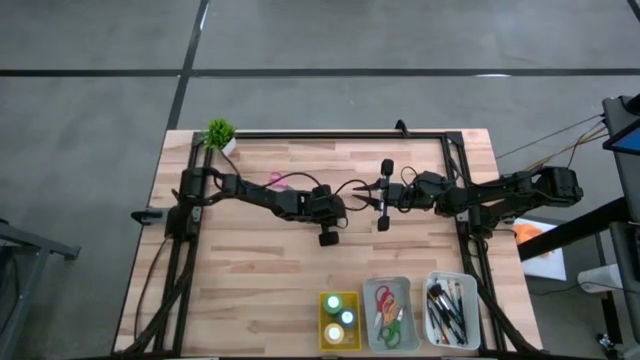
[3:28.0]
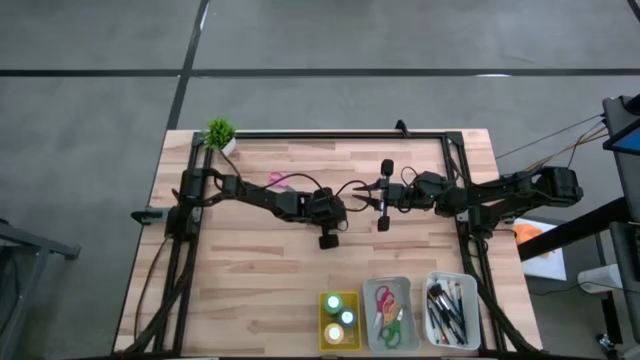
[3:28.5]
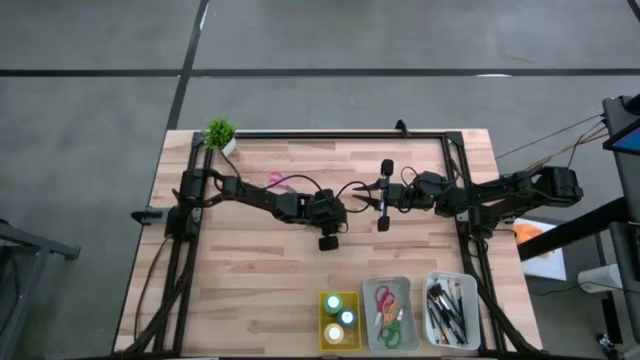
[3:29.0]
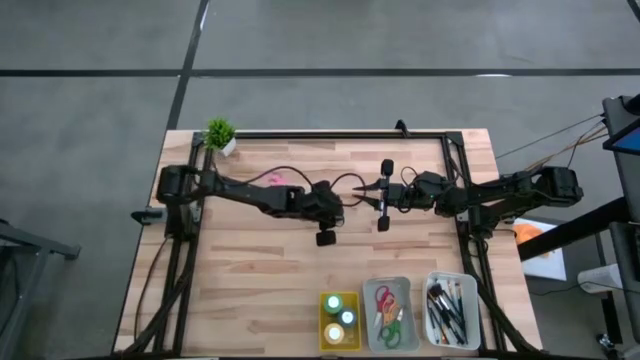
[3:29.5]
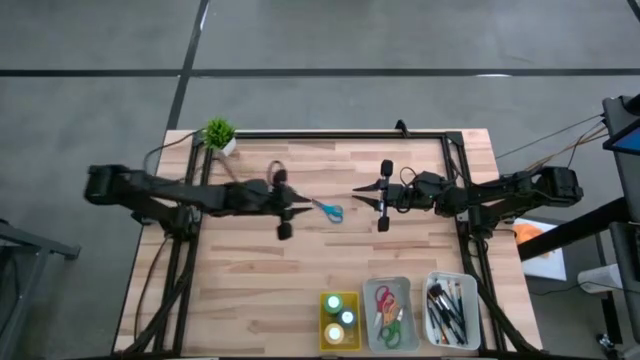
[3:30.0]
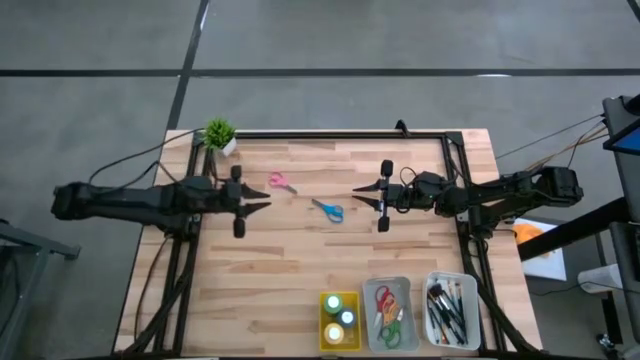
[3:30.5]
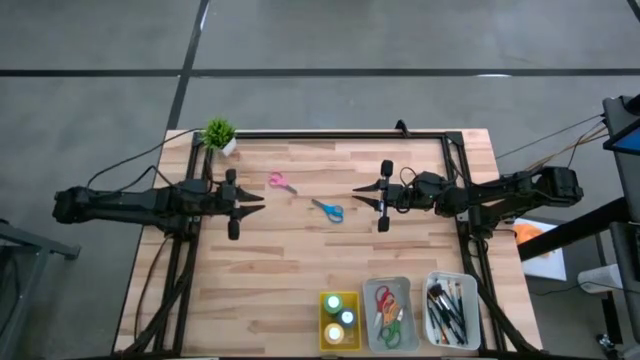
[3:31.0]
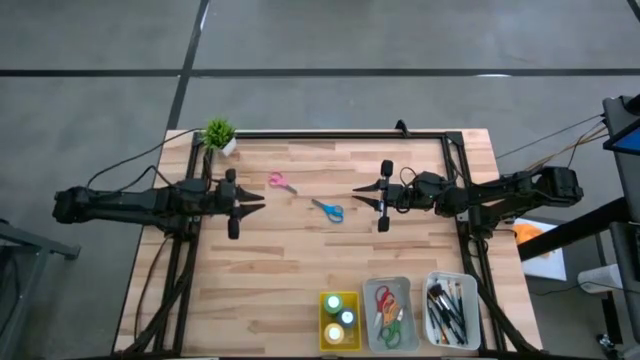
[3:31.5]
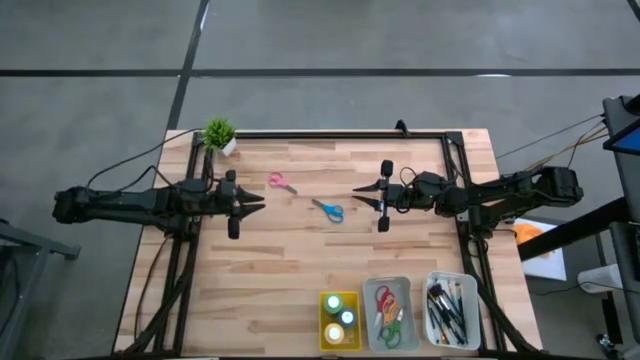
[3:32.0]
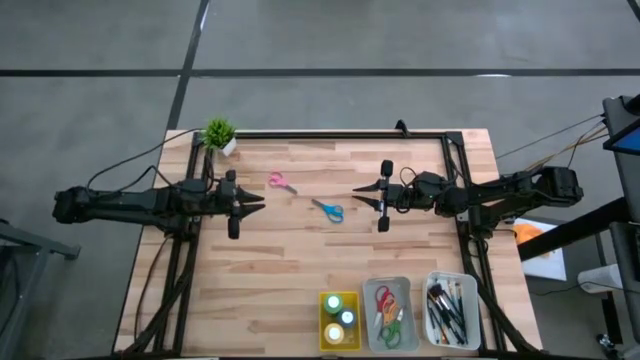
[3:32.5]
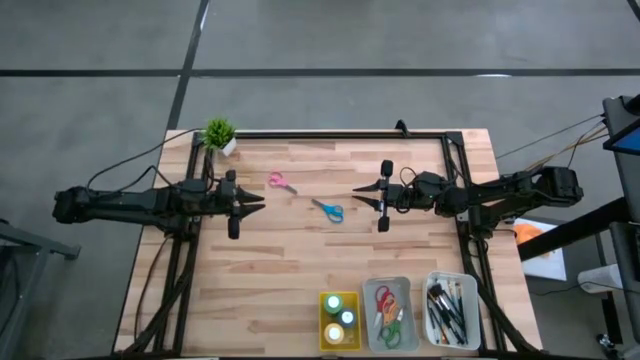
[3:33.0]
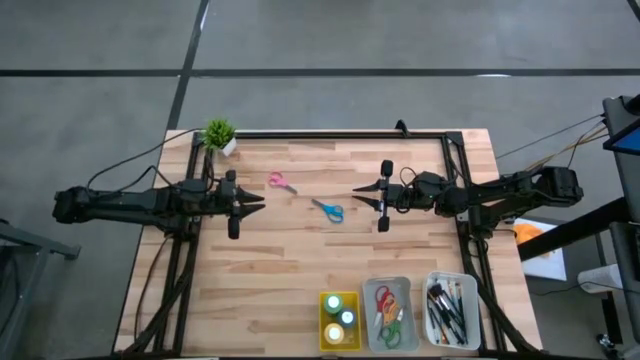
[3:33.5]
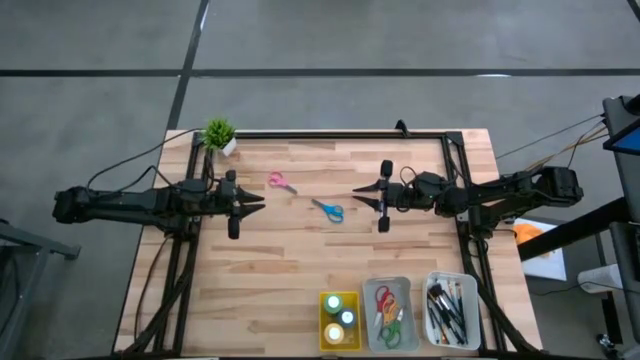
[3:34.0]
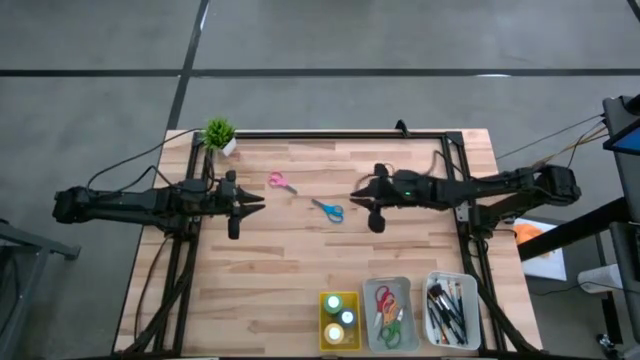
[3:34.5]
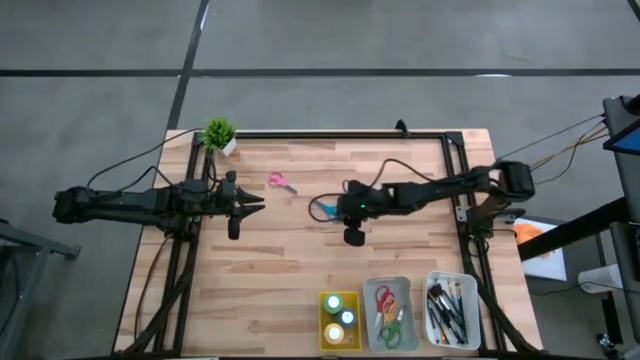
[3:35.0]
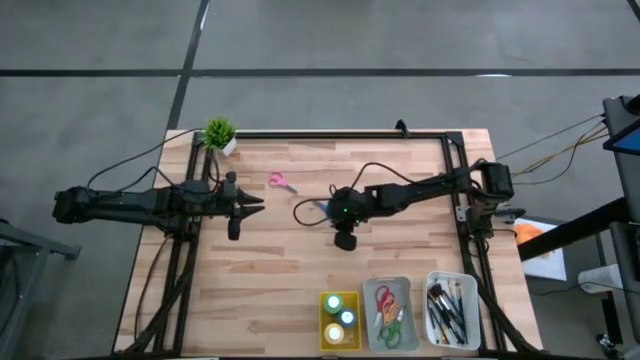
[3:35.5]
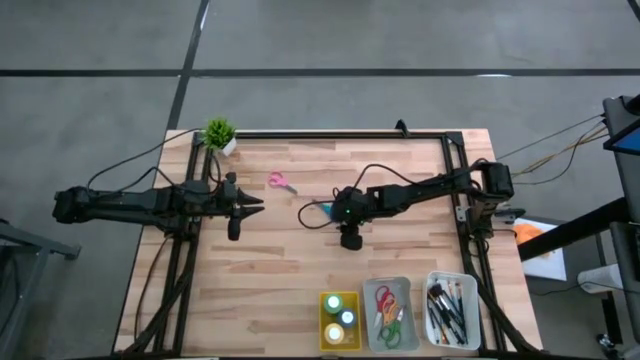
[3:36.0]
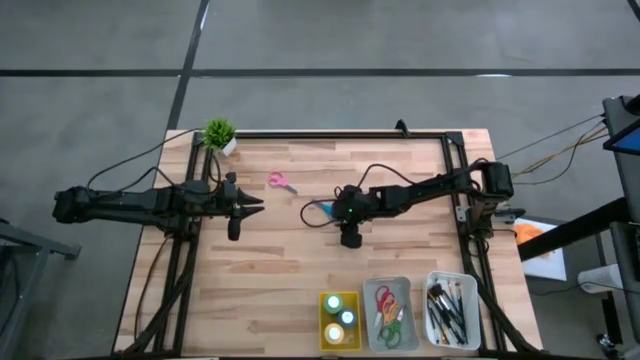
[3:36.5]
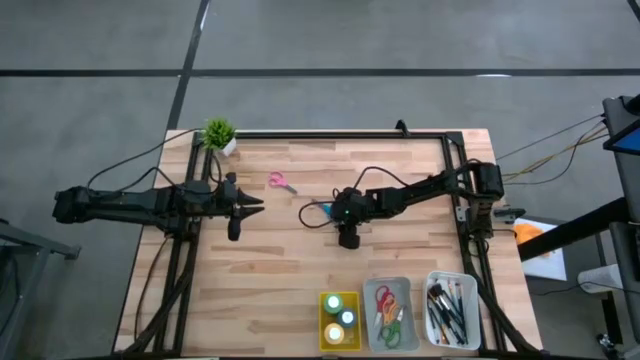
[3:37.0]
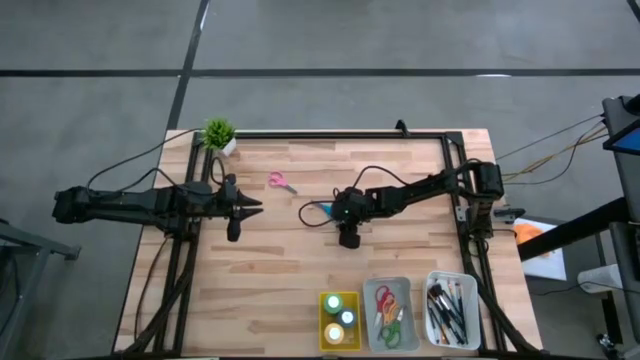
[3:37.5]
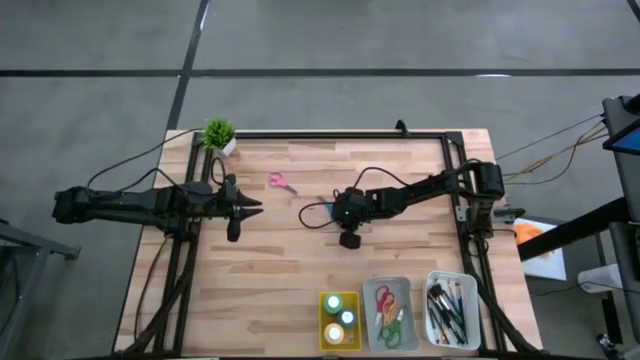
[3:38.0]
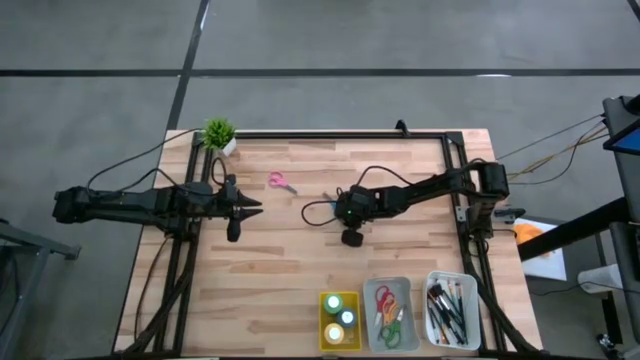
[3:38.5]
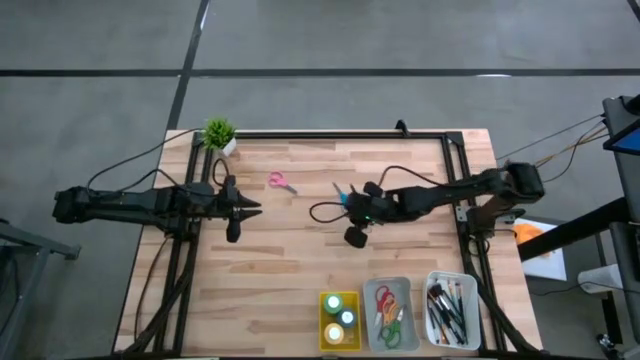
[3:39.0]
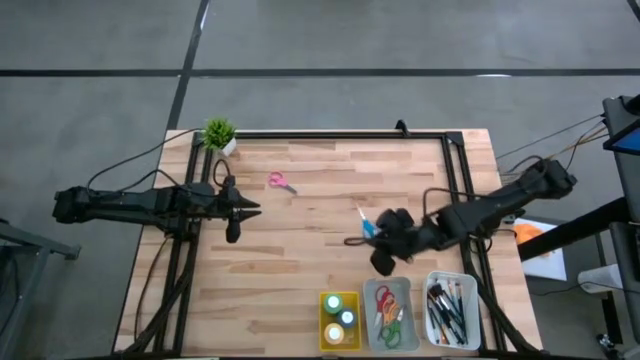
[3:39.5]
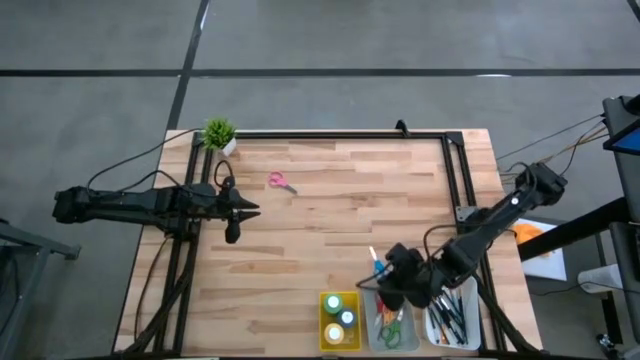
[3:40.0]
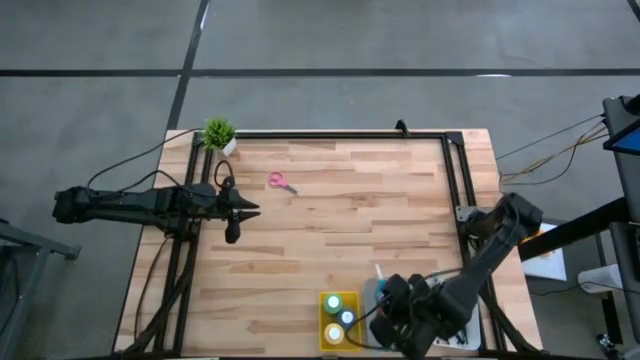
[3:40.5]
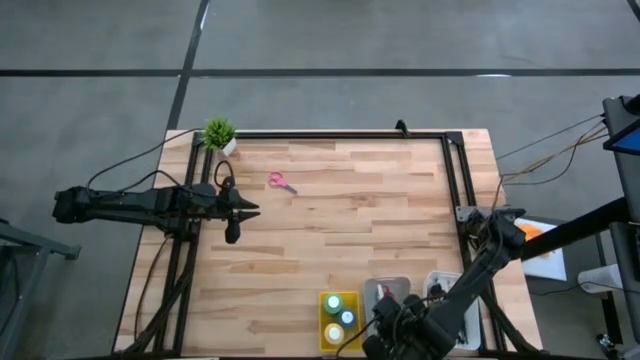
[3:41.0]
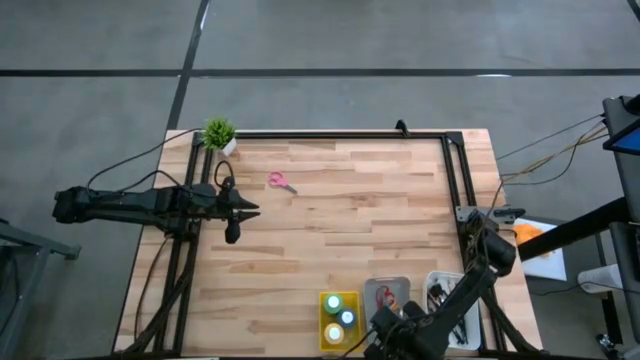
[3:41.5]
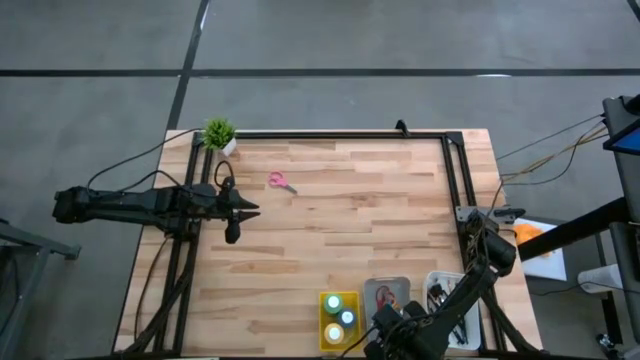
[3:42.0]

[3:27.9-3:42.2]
Task: Pick & Place Paint Supplies
Put the blue scissors into the gray bin
